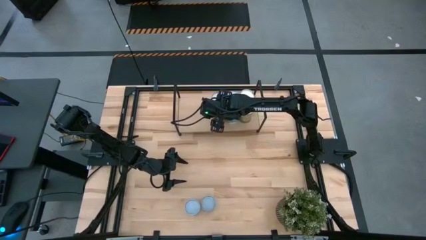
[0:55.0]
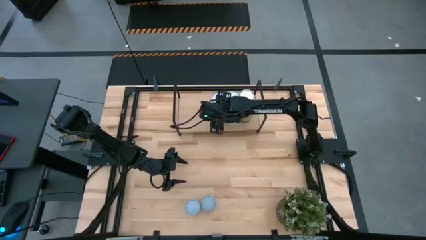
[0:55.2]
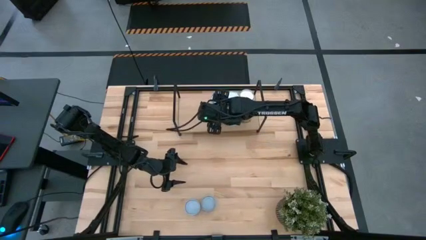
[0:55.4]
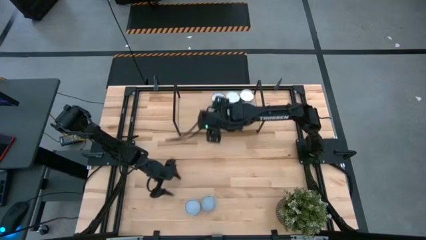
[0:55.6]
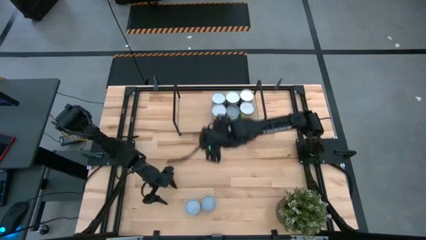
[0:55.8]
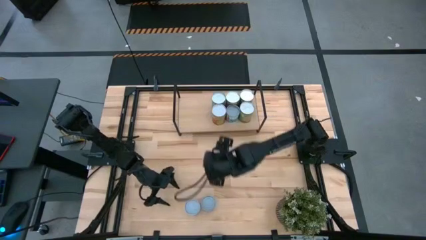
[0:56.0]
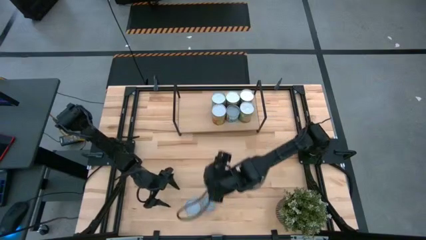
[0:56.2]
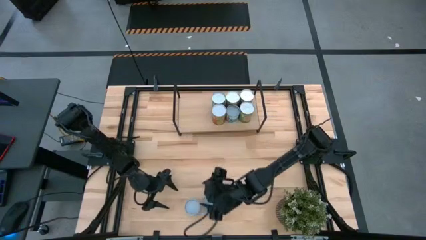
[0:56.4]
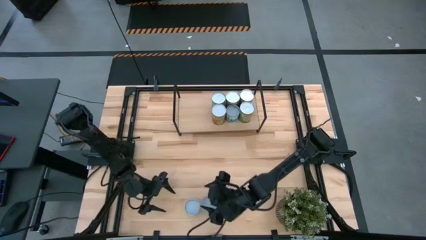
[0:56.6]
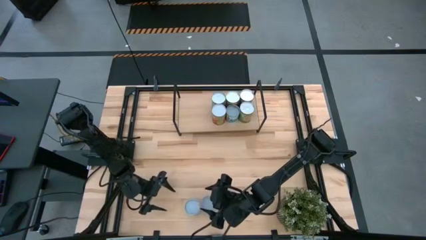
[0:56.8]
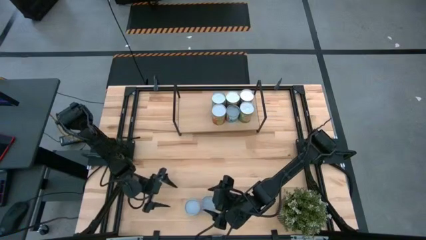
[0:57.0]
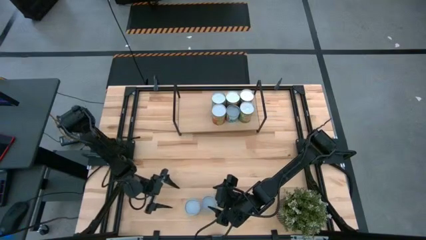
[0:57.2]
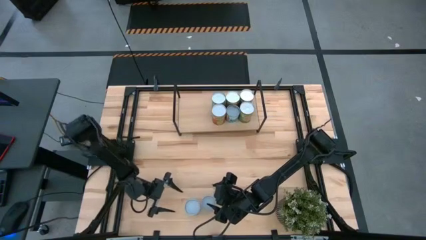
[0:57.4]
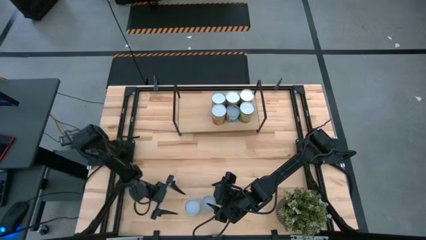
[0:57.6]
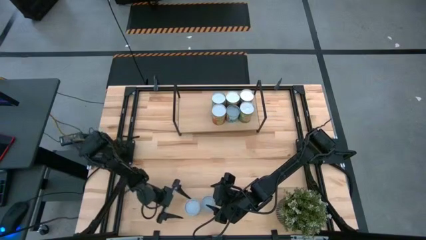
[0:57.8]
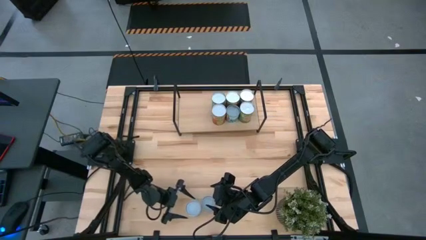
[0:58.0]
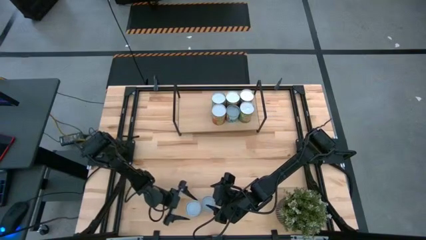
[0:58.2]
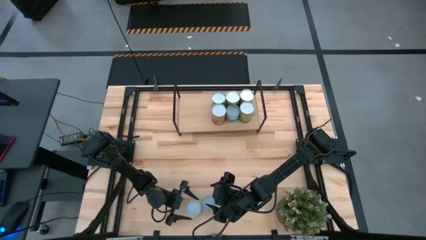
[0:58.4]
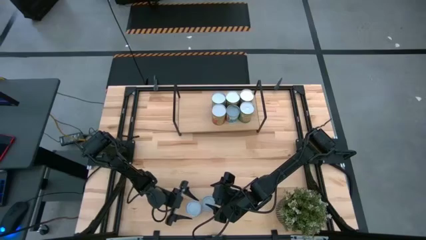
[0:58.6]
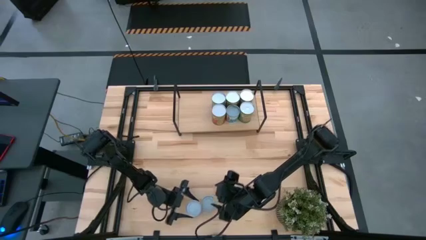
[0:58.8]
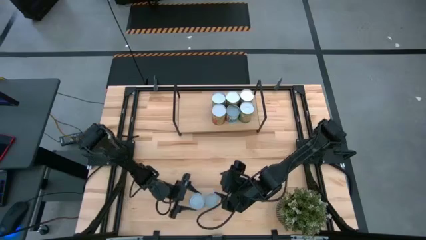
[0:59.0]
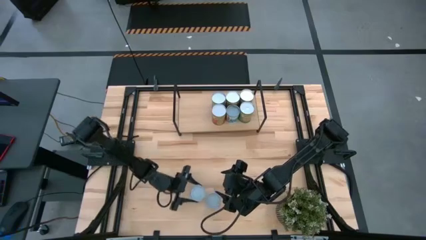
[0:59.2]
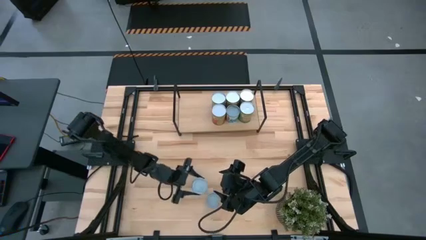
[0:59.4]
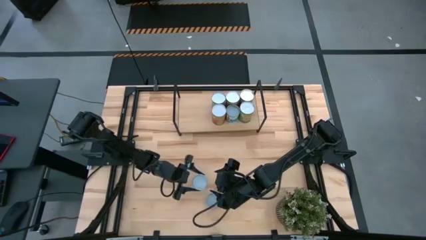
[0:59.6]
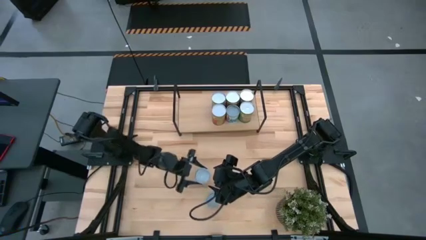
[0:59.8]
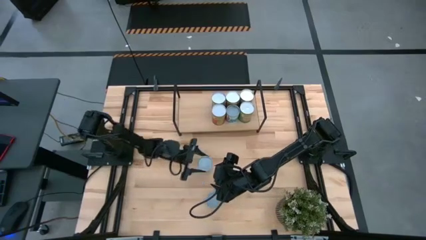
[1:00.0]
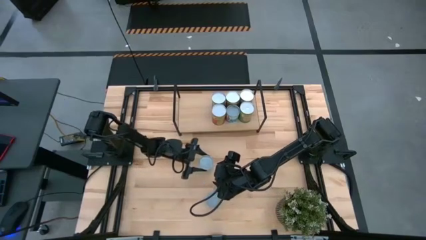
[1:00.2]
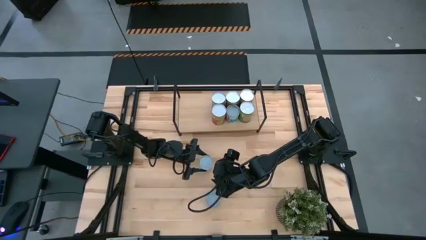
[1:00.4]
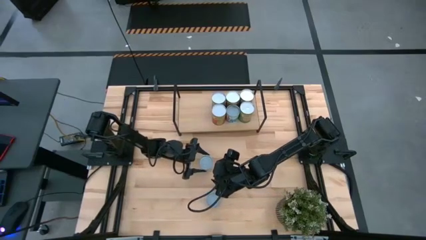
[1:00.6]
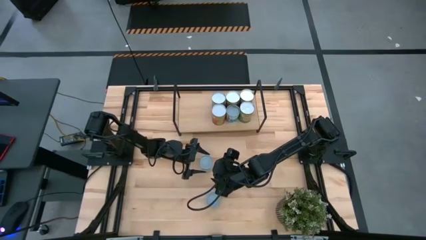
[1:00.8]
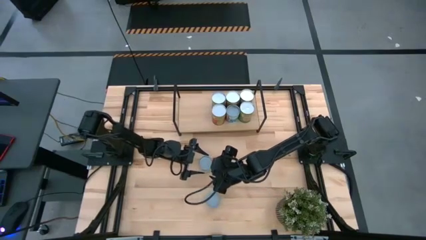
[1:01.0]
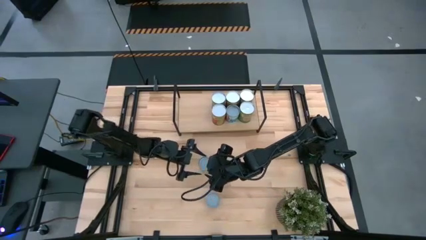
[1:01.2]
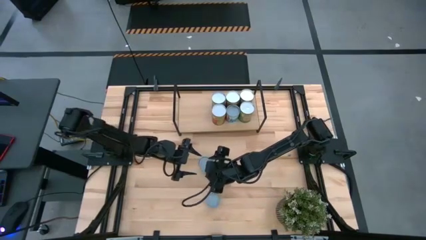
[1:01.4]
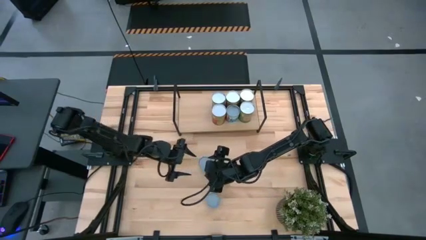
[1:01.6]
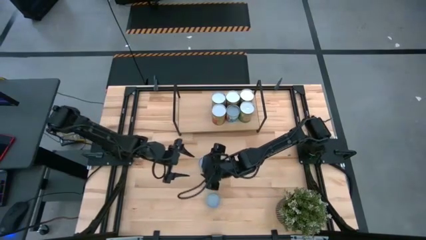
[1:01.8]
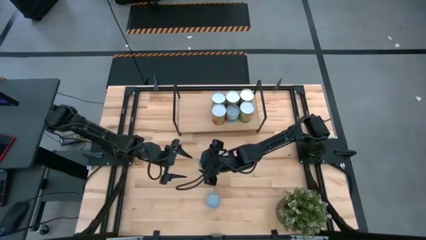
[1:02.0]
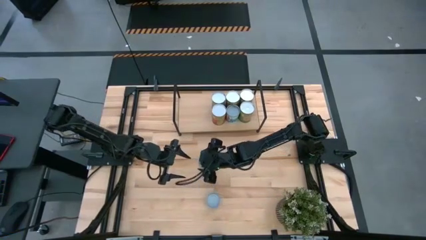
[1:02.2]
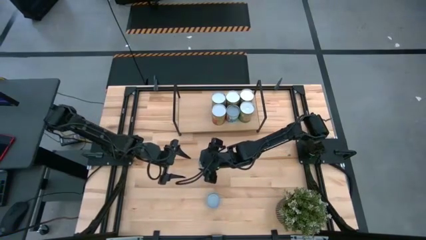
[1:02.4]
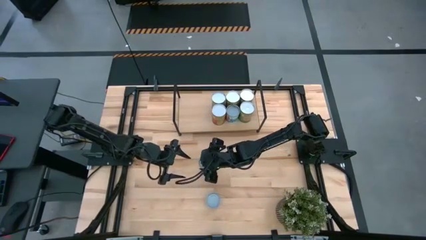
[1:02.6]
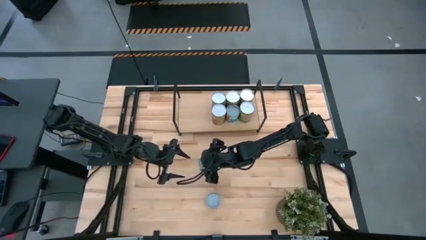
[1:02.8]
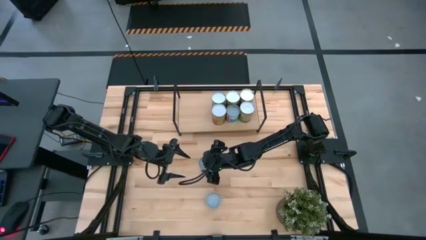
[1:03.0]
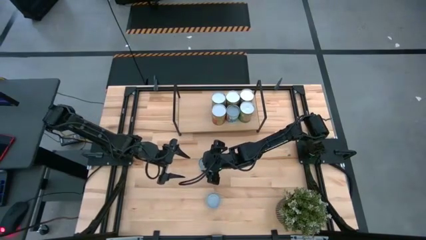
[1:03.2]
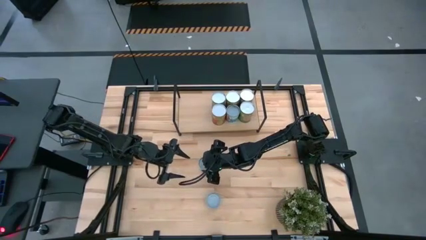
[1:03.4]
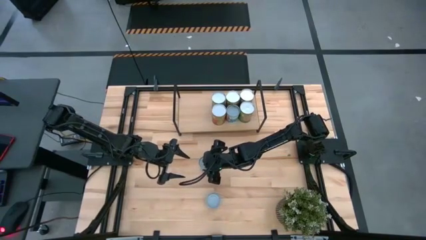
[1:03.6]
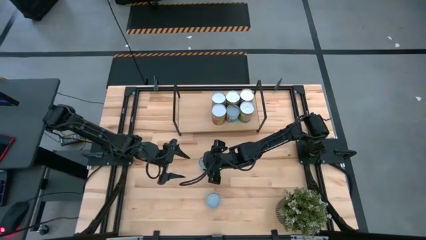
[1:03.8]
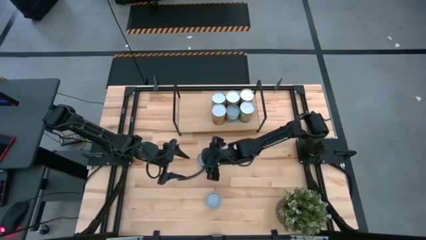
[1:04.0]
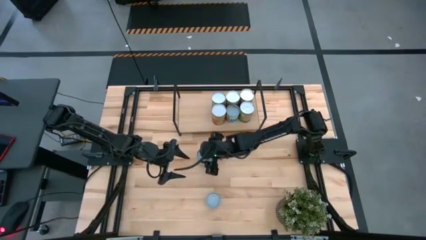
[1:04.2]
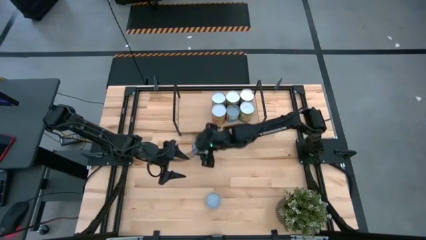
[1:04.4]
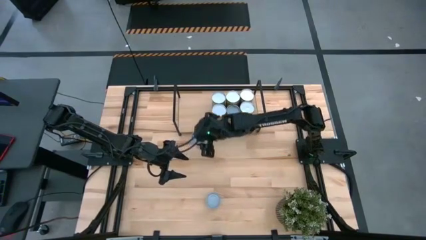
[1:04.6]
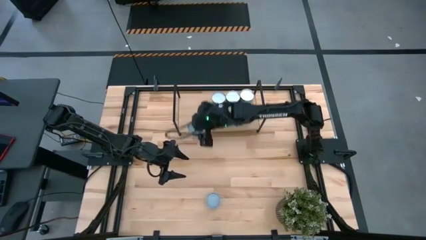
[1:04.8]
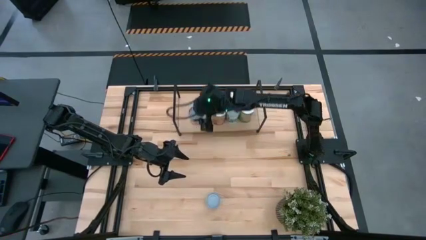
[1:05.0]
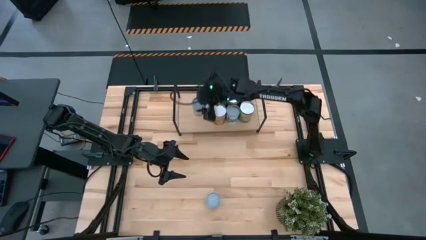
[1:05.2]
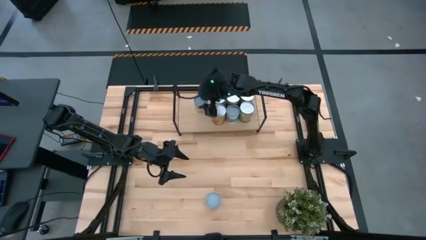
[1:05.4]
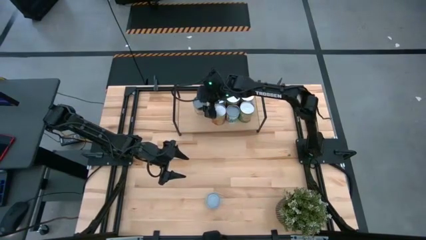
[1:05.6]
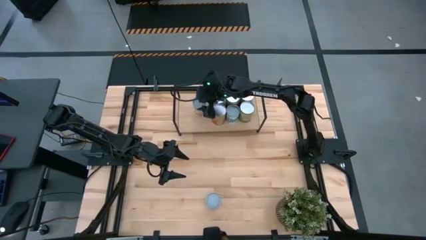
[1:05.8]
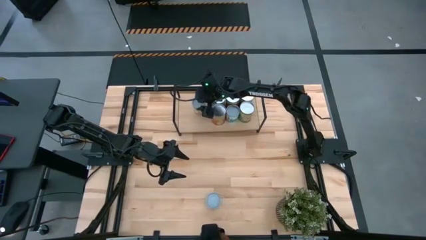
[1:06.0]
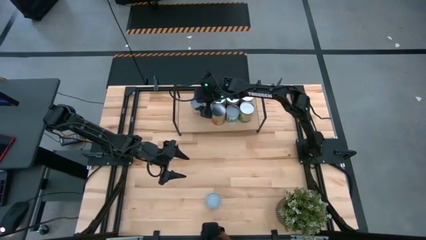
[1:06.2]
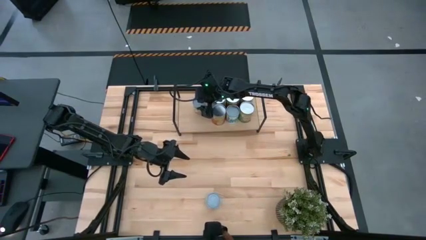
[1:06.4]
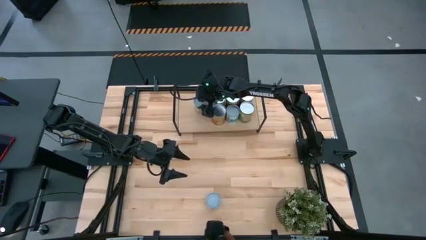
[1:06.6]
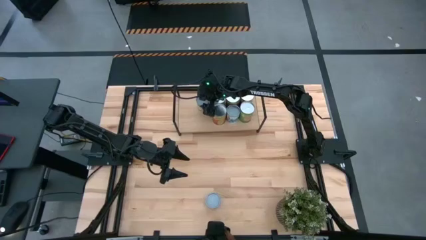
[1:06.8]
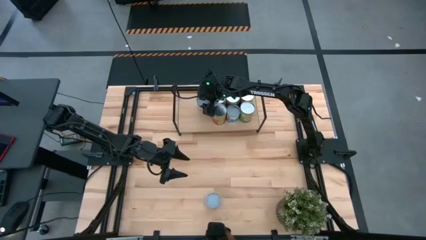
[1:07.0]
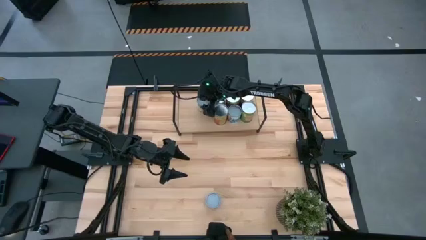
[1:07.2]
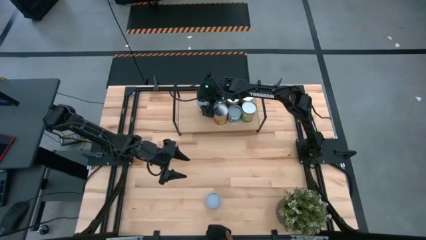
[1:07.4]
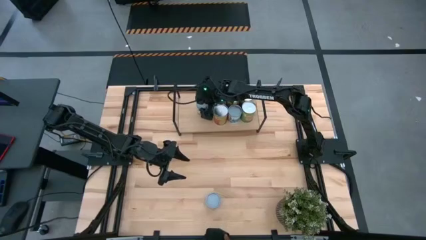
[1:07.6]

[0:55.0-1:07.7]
Task: Pick and place cans onto a shelf
Put the canned chicken soup on the shelf

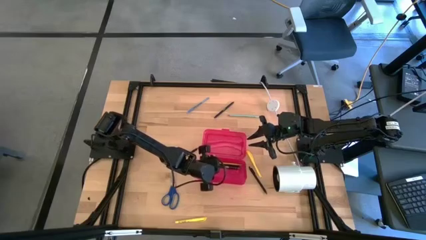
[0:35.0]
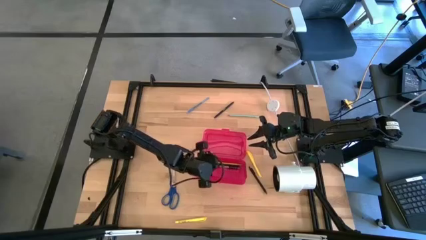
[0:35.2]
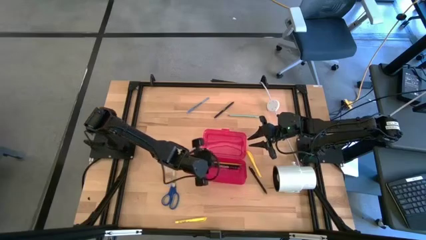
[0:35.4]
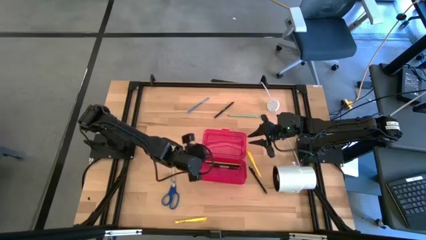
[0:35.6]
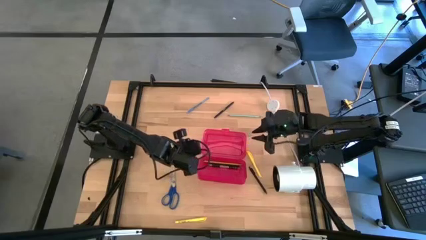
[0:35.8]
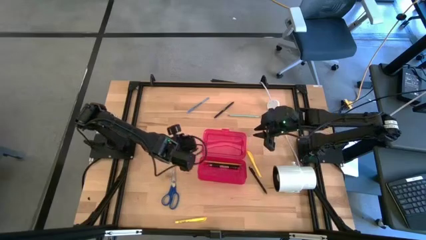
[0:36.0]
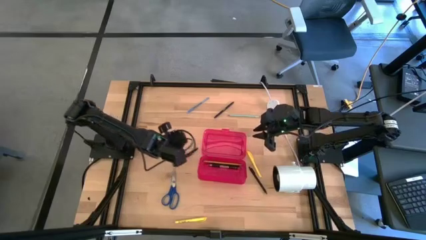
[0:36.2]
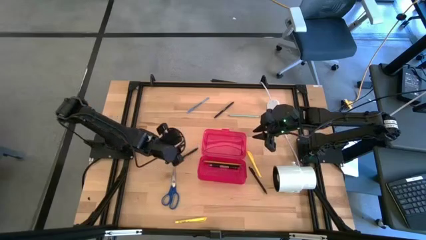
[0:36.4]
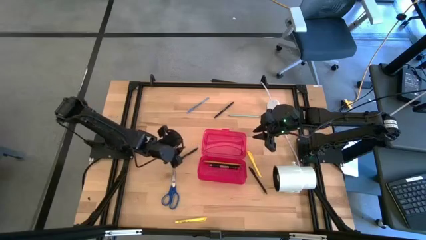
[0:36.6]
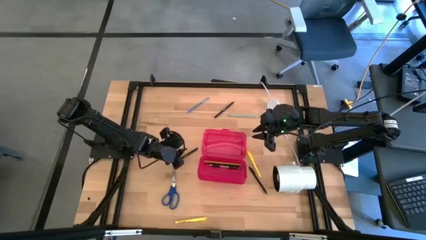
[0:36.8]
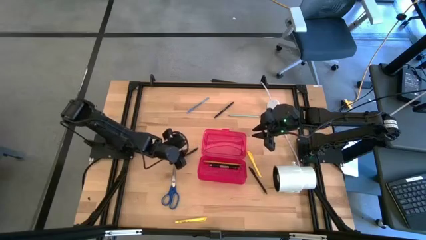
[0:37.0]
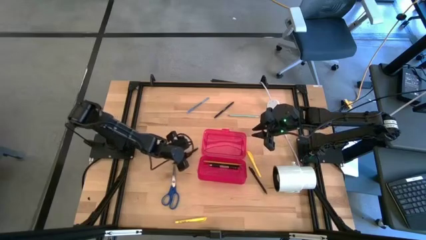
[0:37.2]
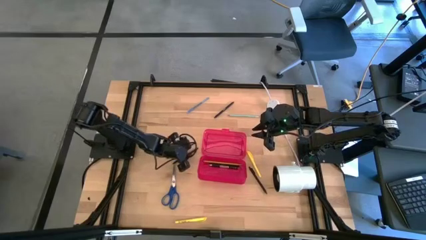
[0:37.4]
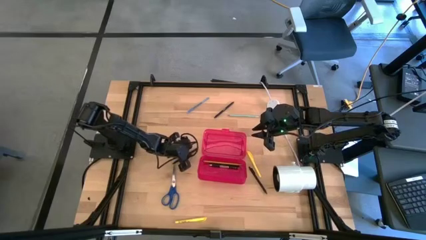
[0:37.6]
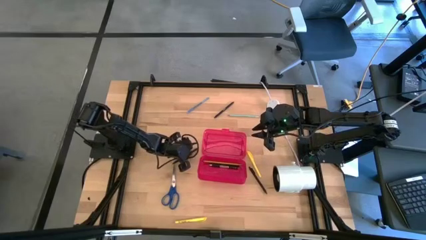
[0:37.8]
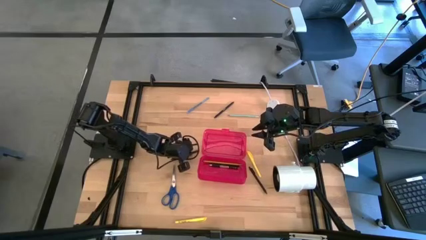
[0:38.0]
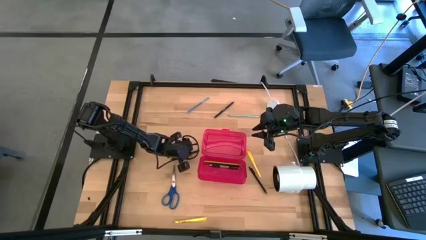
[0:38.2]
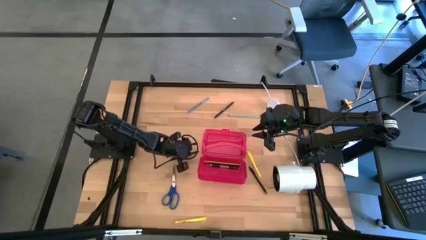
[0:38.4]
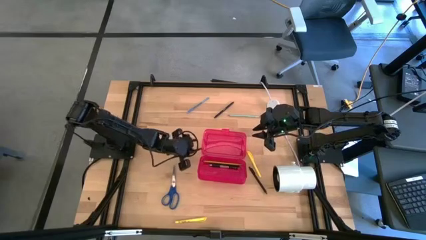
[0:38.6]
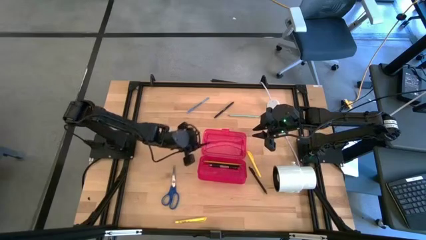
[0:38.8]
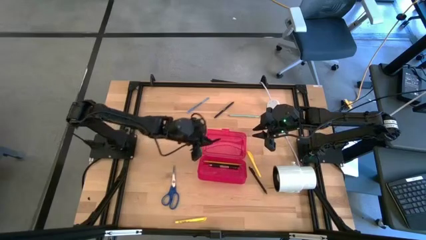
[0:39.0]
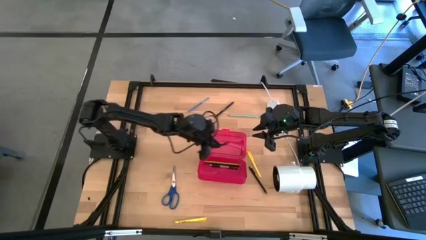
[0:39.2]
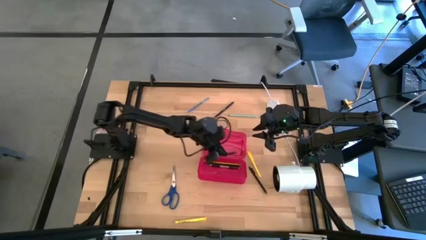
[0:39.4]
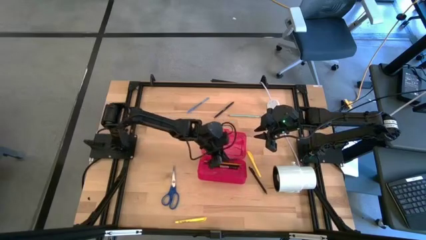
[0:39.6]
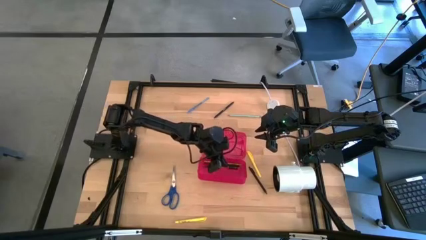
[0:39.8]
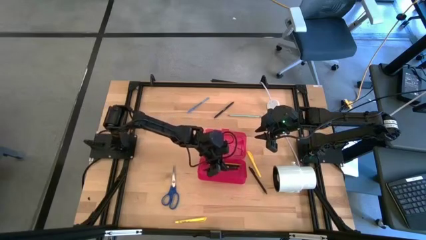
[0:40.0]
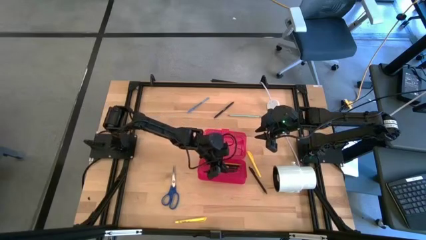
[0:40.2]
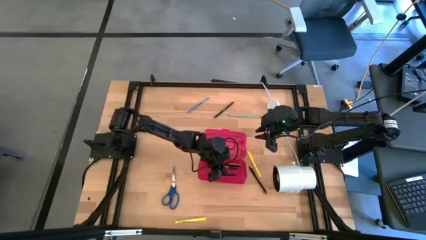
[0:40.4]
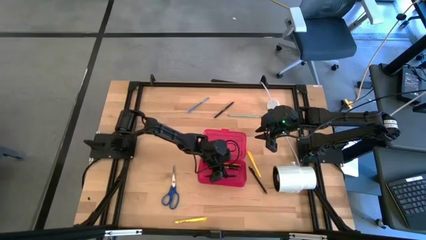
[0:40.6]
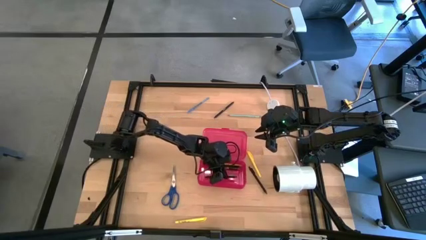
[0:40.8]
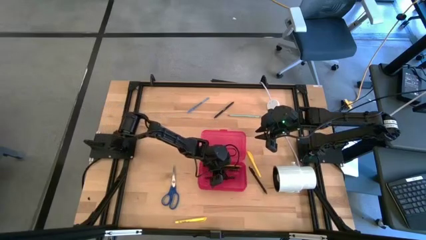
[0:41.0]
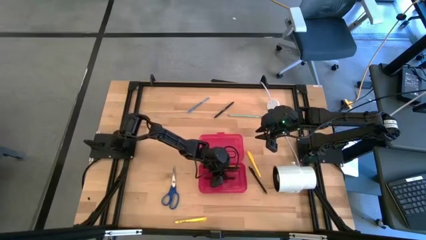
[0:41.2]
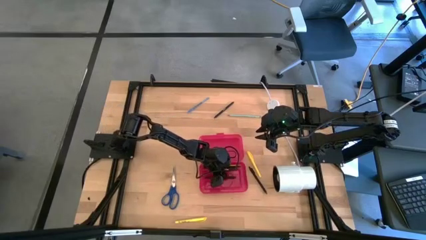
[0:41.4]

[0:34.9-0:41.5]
Task: Pick & place school supplies into a supply box
Put the middle black pen into the red supply box
